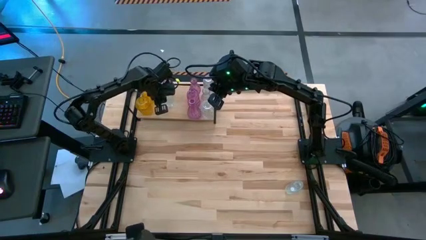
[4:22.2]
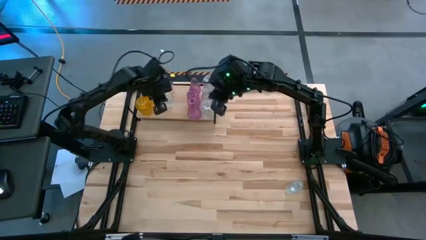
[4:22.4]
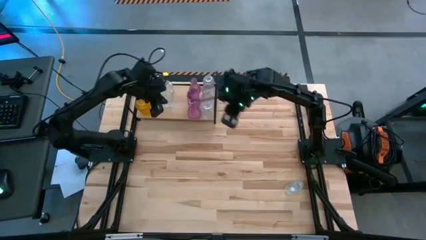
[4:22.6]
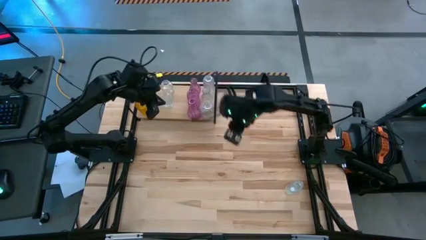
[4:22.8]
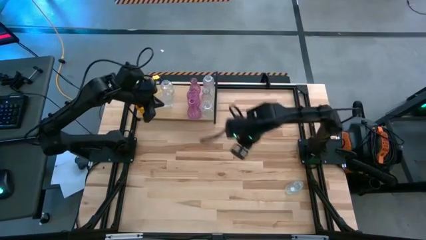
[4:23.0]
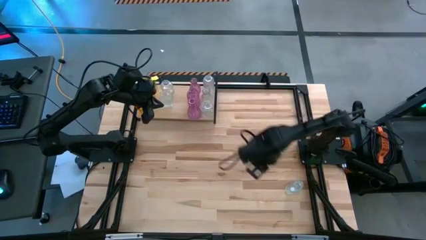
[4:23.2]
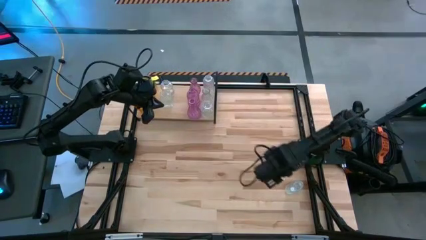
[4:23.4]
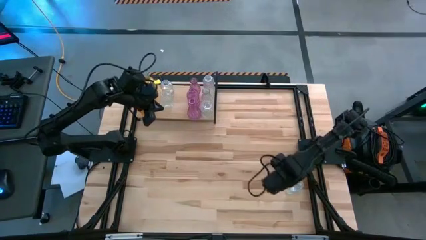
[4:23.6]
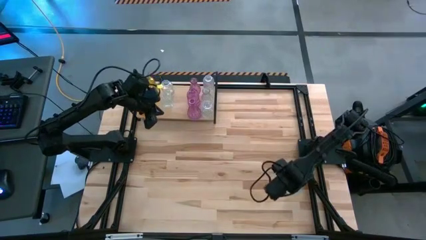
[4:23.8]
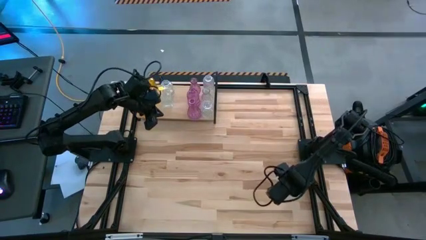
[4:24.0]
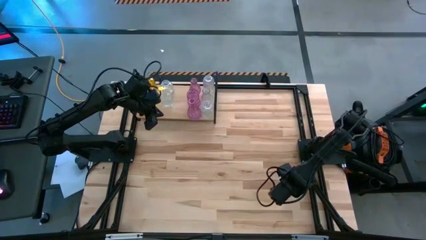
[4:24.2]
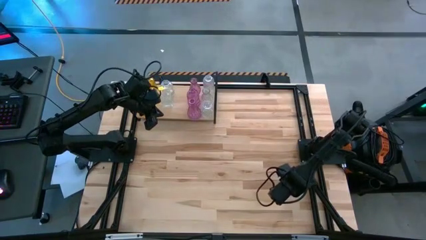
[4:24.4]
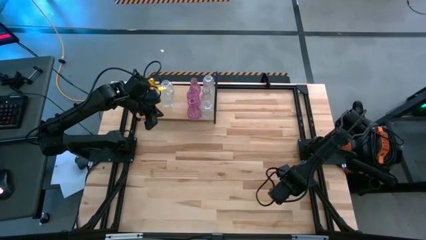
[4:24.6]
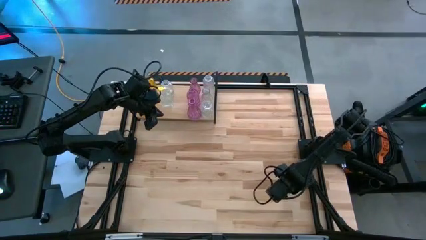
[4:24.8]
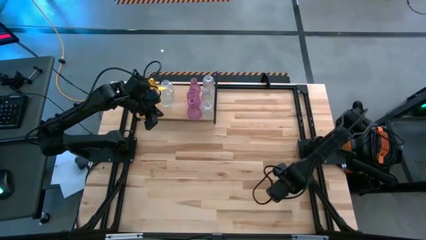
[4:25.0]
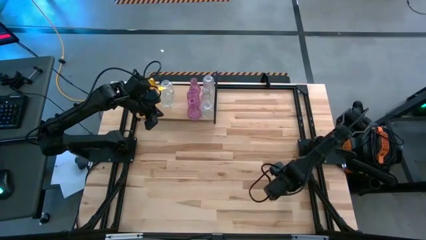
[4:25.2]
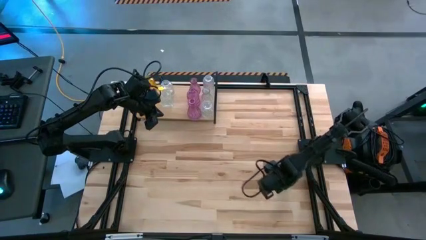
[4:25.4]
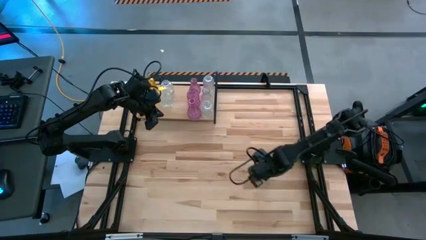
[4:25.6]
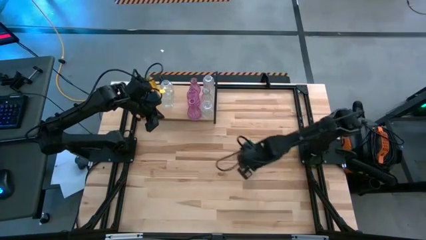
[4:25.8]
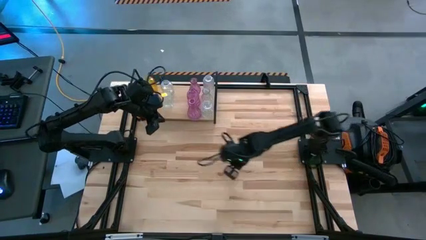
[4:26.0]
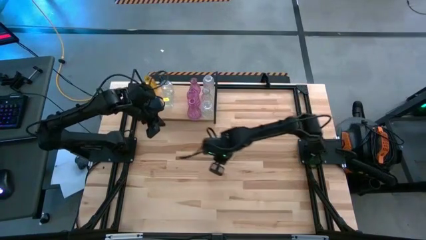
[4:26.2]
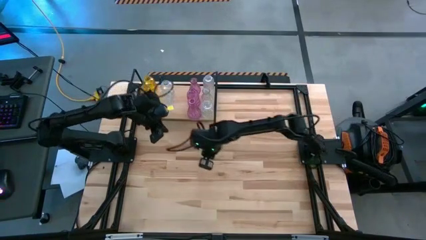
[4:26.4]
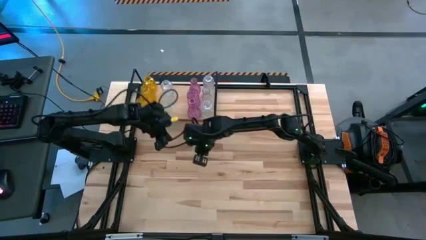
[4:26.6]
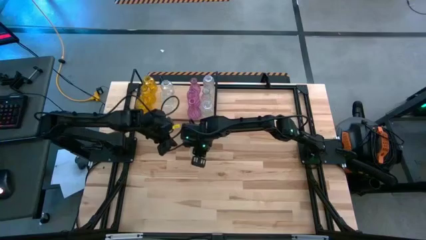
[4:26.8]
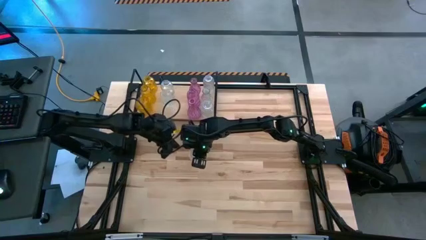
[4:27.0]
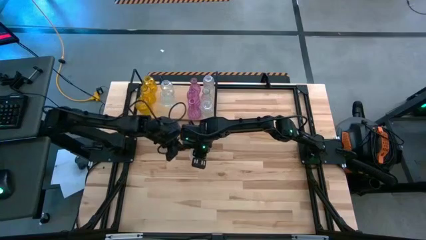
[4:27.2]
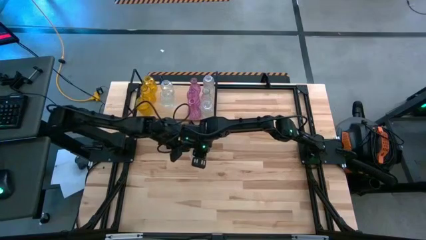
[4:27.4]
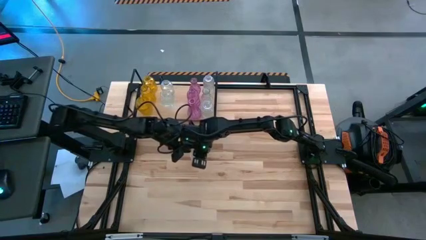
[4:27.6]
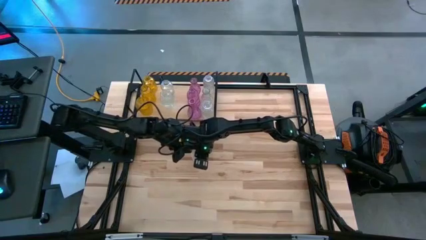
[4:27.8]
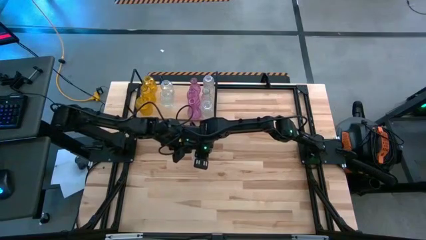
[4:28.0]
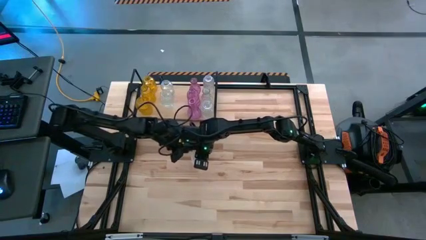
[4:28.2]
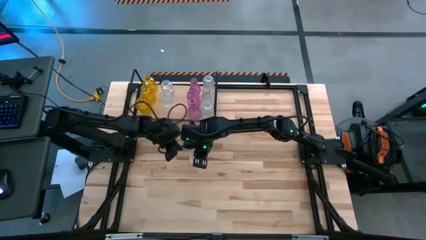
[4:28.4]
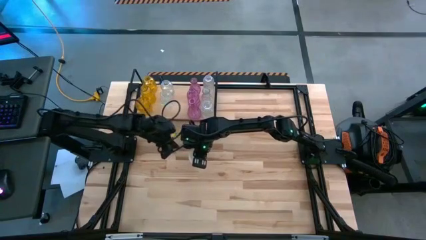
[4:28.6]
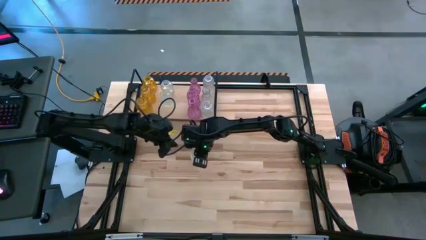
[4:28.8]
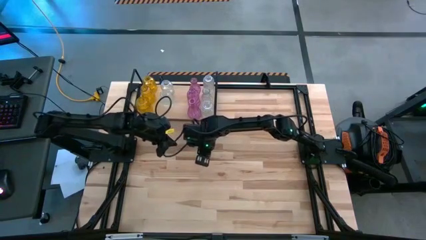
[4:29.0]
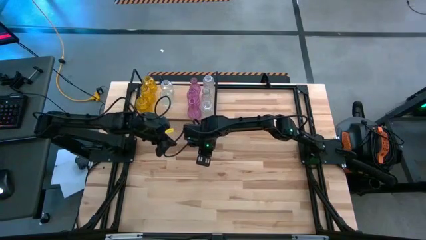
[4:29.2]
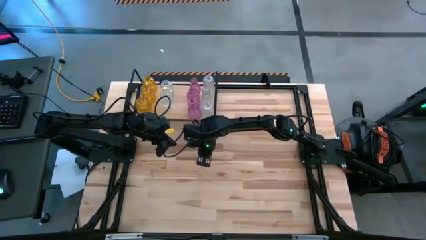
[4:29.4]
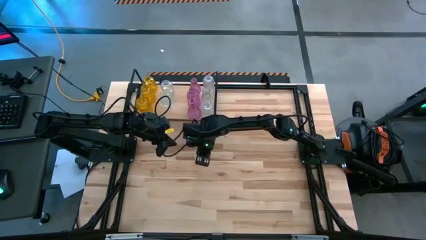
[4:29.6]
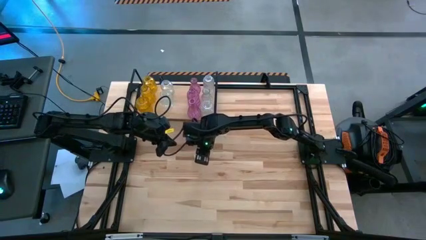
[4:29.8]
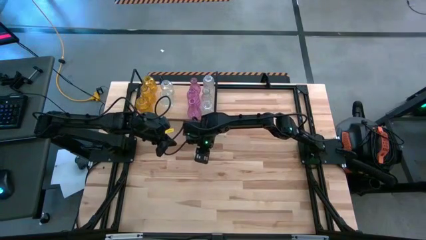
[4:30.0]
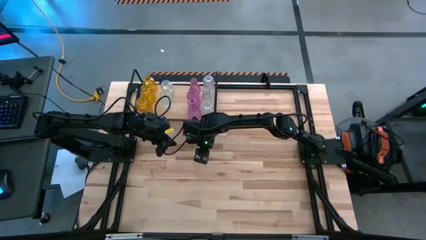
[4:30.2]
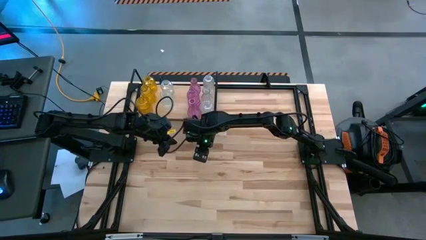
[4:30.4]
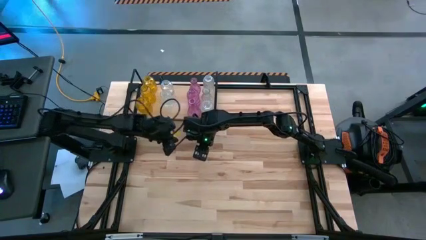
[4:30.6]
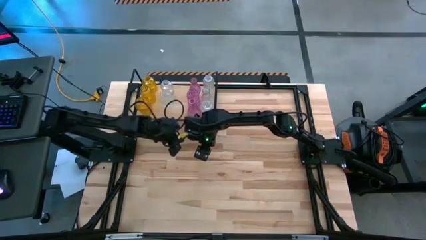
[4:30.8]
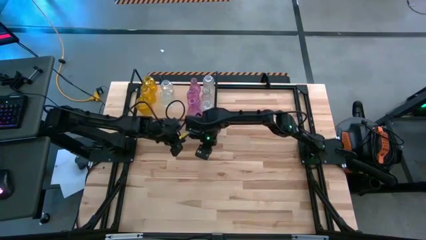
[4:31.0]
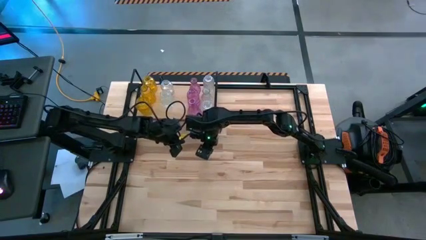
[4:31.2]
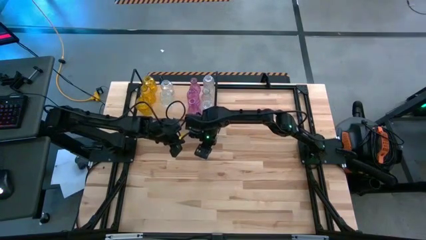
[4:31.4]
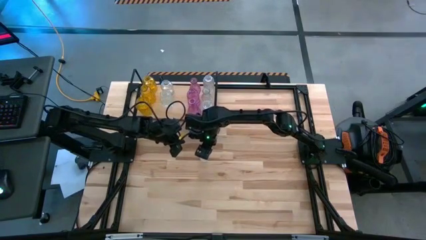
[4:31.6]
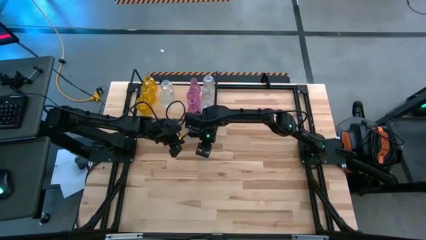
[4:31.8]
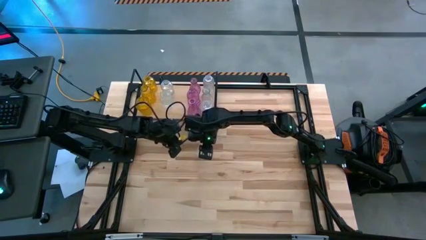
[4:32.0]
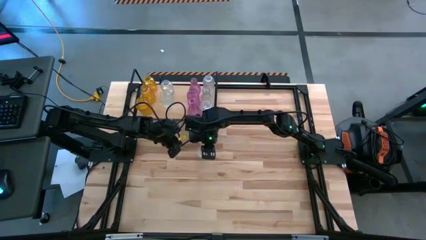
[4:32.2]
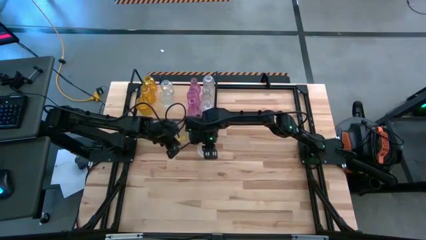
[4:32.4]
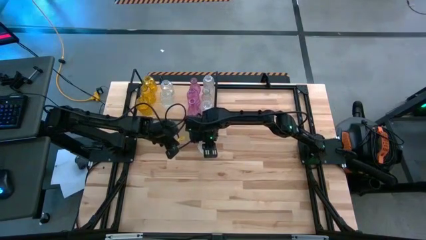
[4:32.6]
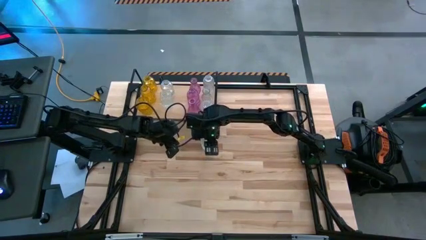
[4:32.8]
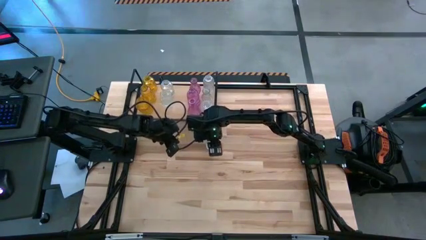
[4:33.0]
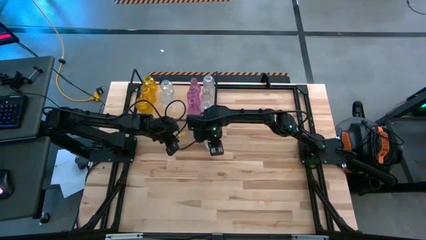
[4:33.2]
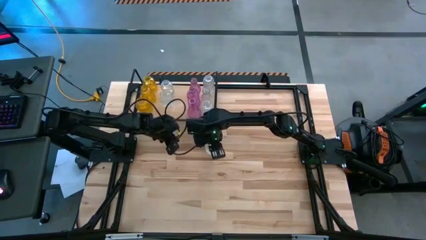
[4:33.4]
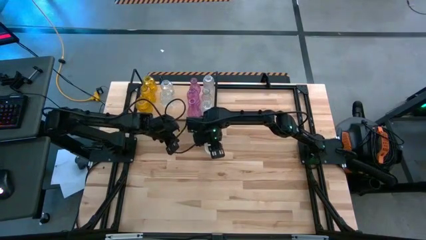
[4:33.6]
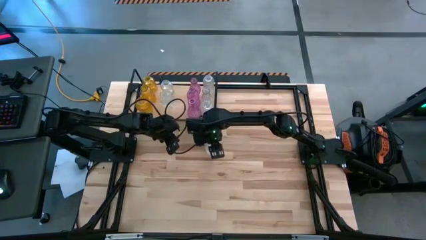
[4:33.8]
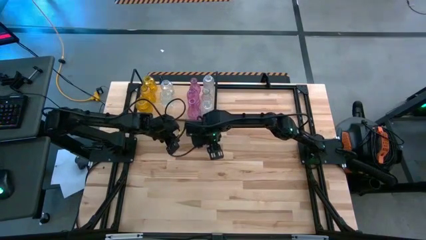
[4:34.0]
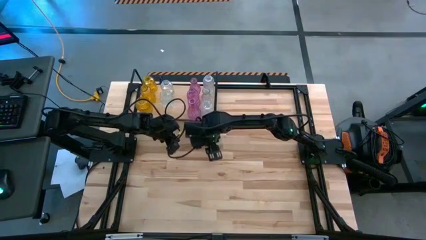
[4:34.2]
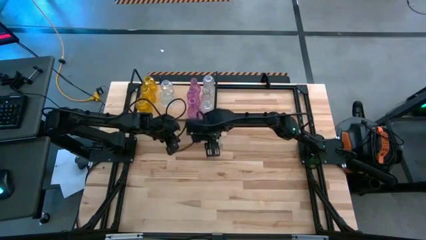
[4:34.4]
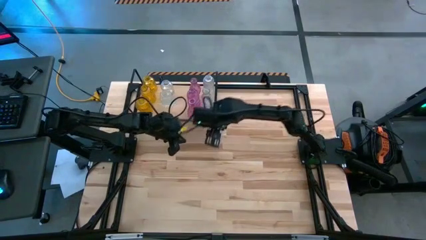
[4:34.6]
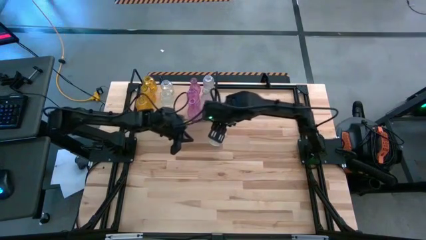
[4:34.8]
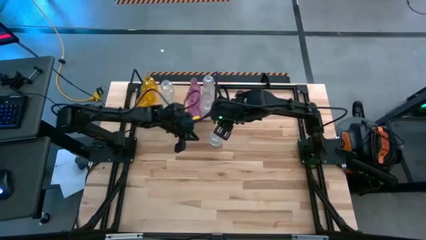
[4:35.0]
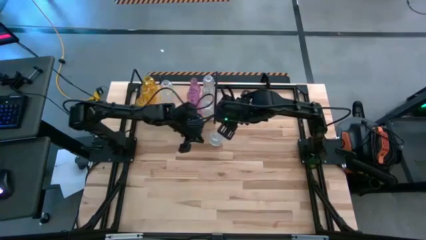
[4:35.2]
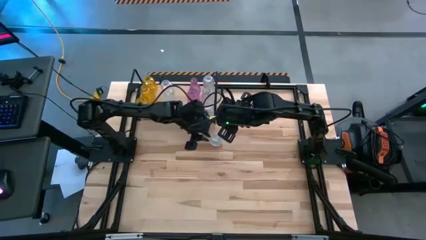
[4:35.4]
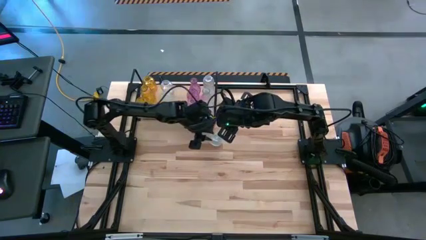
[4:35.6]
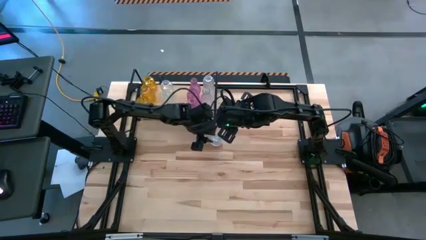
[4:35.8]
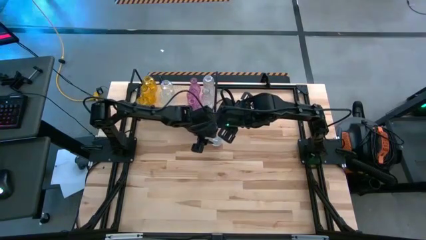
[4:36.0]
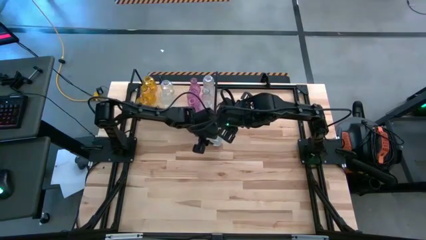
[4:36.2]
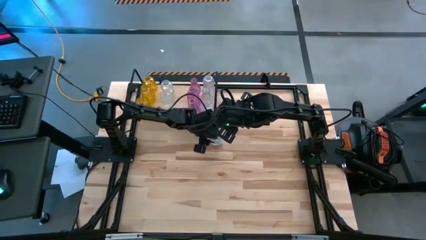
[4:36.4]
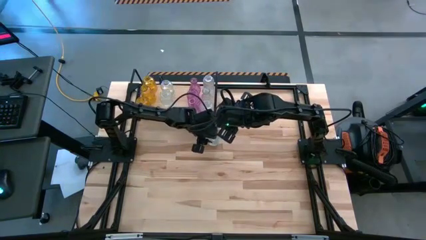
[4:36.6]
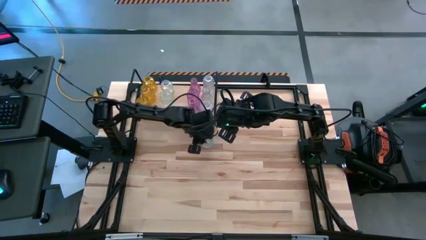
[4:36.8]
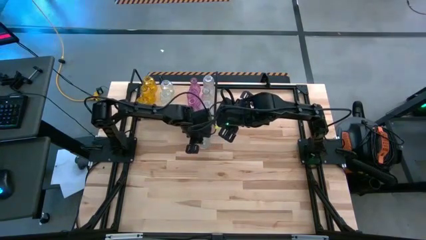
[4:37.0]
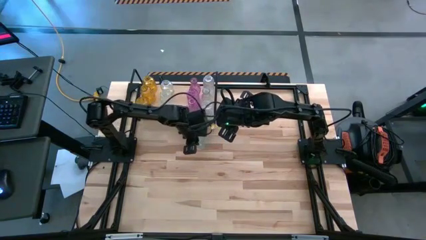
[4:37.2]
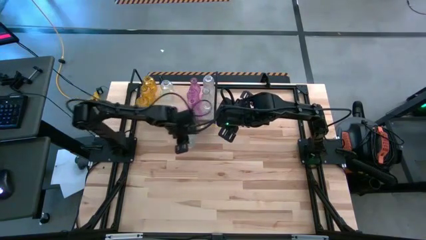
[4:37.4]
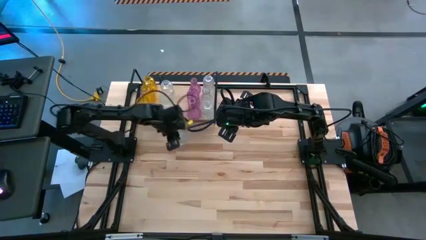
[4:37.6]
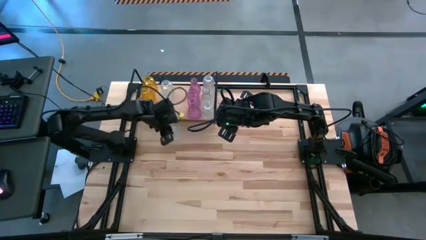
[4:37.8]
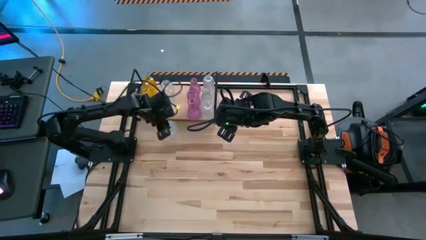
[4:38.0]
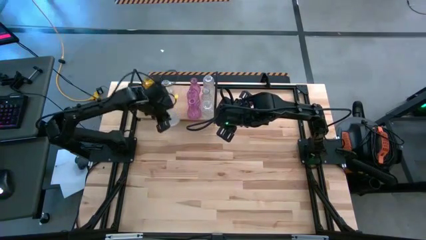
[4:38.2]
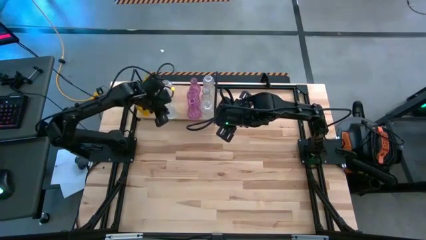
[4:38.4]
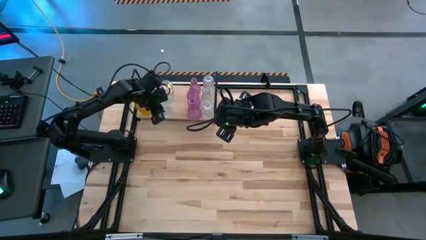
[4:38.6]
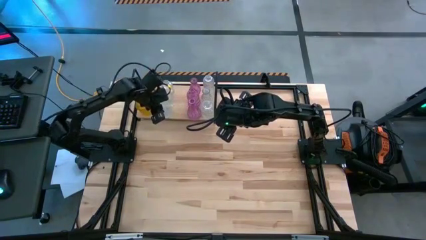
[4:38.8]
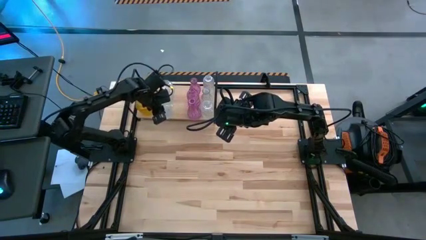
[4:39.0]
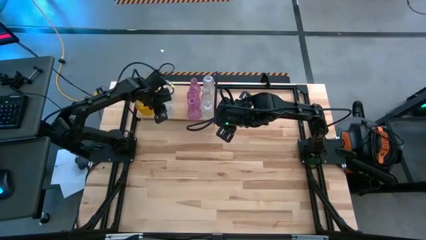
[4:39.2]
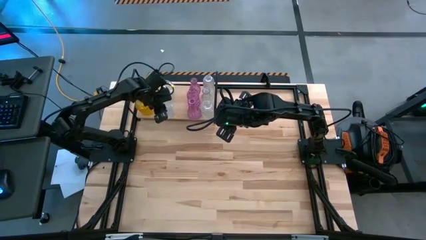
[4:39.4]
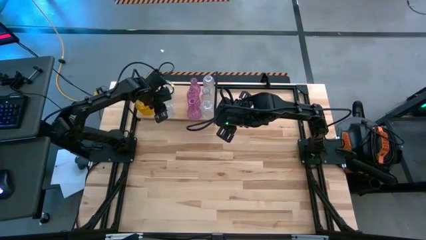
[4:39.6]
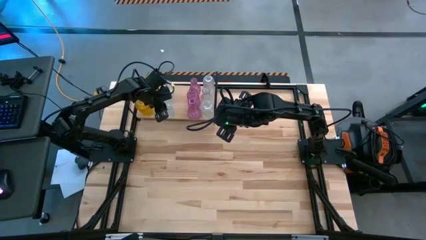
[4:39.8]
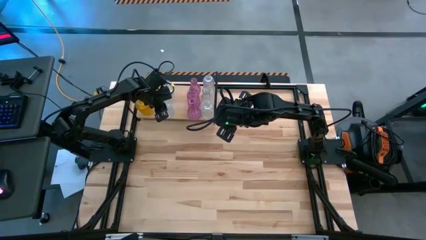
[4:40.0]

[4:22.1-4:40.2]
Task: sort vases onto shelf
Put the transparent vase on the shelf aligned with the left transparent vases
